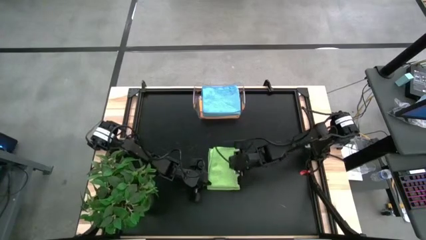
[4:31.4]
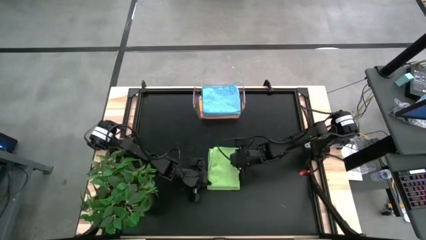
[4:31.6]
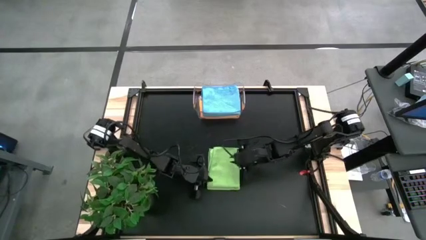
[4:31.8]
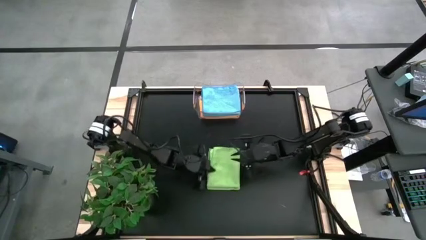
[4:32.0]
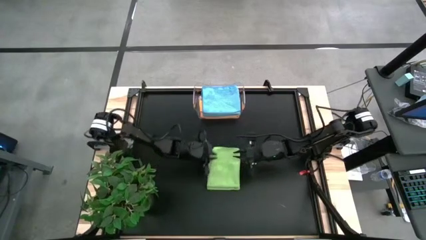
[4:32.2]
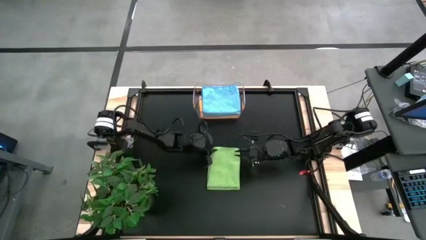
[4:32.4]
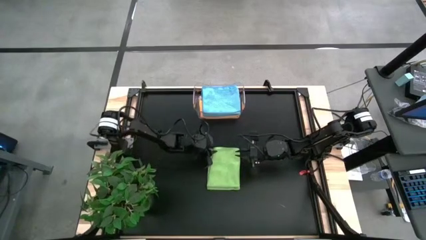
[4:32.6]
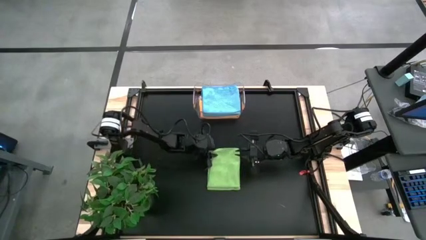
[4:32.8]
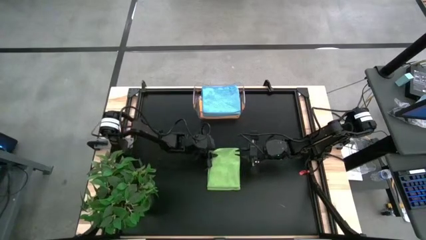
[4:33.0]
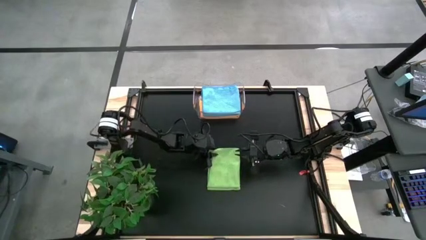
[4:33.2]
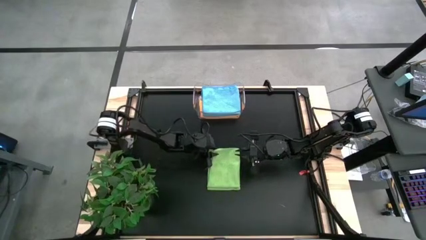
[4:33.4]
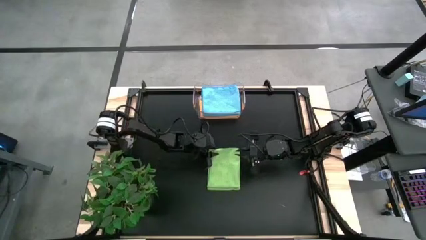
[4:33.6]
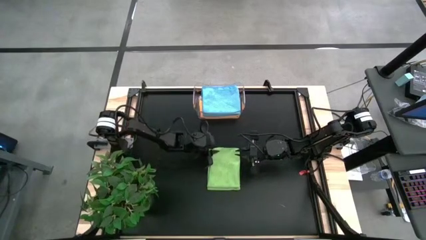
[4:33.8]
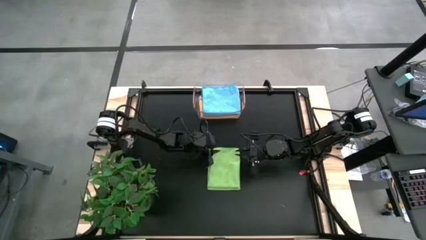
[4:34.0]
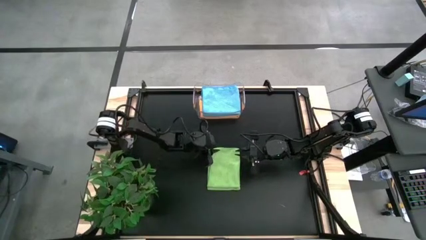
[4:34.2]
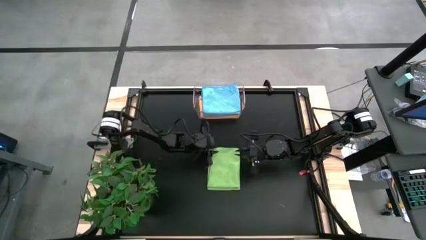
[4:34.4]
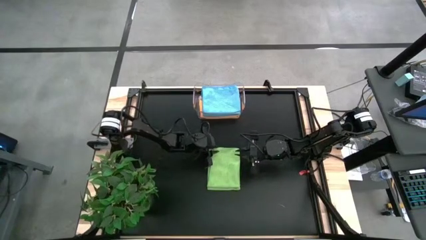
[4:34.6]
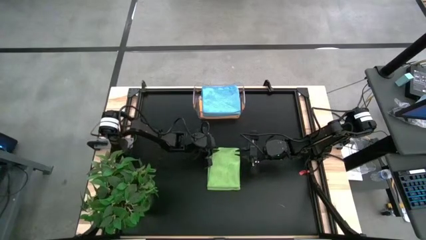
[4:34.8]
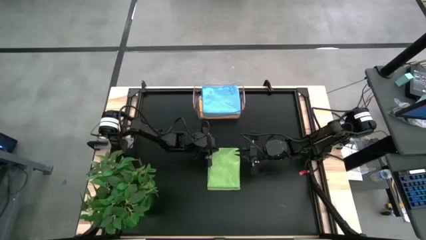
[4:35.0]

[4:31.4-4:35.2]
Task: Fold microfiber towels
Fold the green microfiber cloth

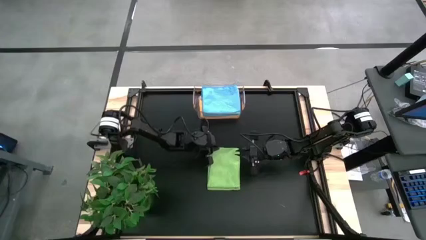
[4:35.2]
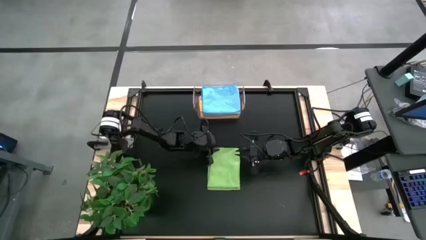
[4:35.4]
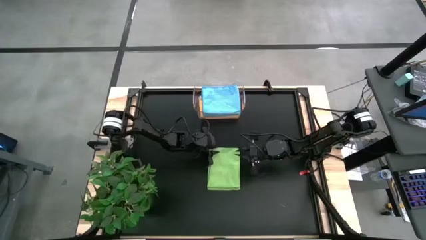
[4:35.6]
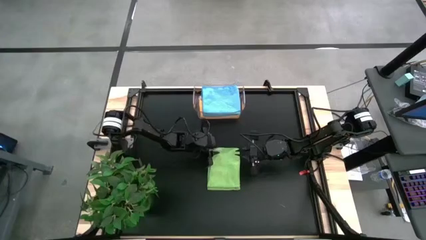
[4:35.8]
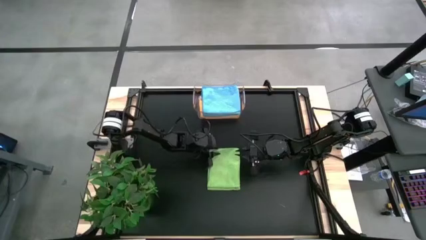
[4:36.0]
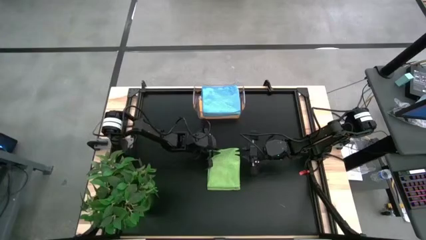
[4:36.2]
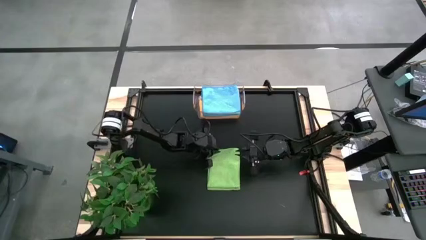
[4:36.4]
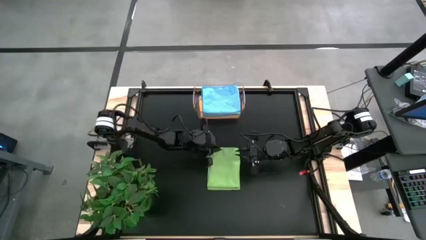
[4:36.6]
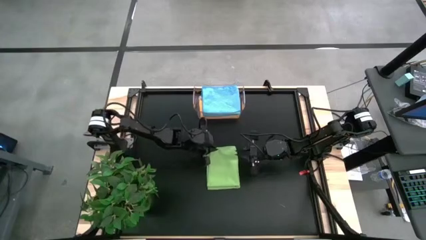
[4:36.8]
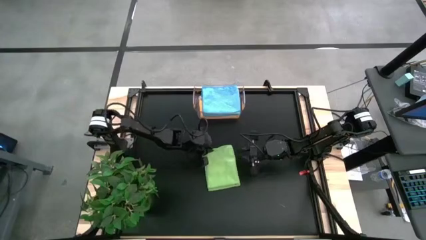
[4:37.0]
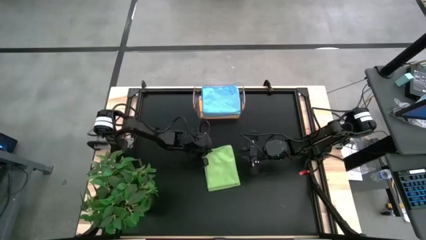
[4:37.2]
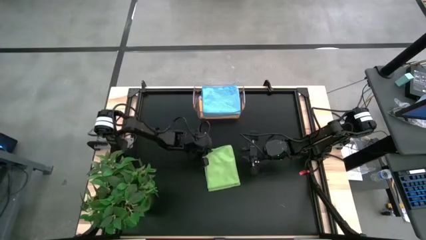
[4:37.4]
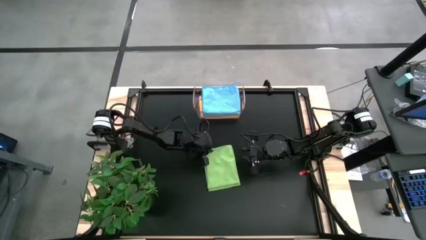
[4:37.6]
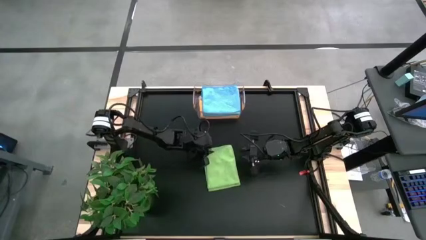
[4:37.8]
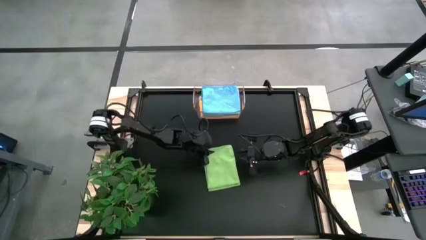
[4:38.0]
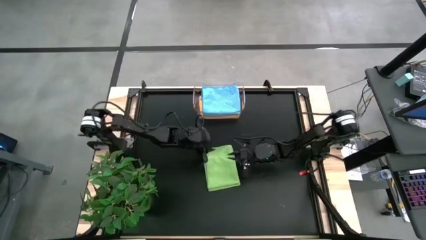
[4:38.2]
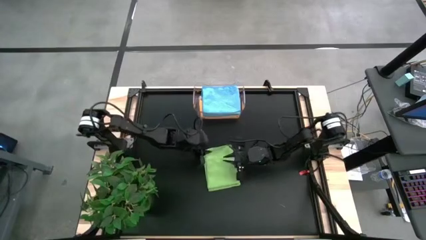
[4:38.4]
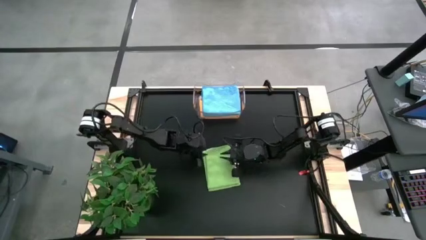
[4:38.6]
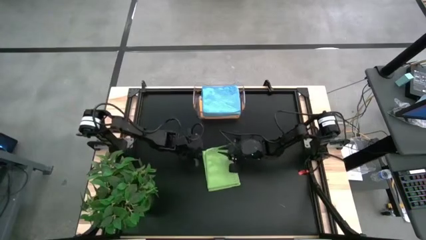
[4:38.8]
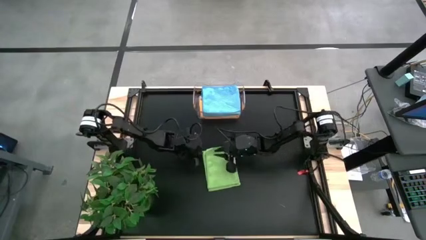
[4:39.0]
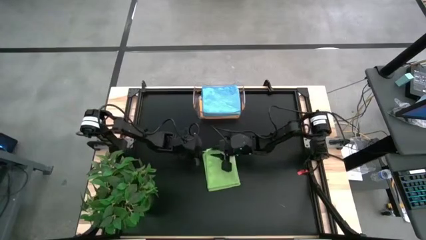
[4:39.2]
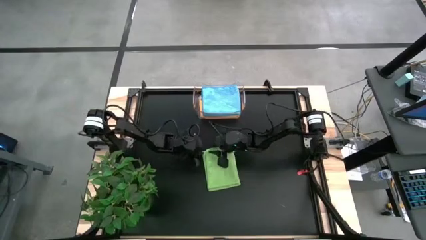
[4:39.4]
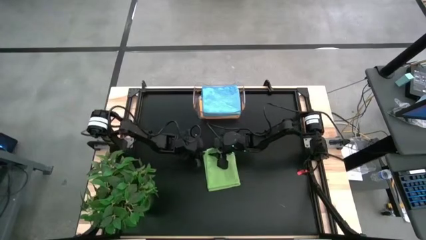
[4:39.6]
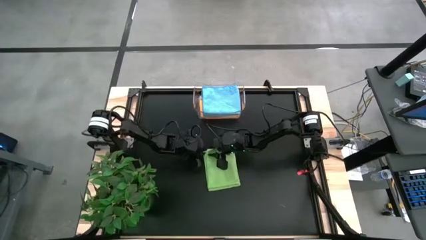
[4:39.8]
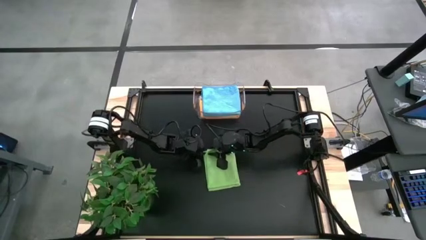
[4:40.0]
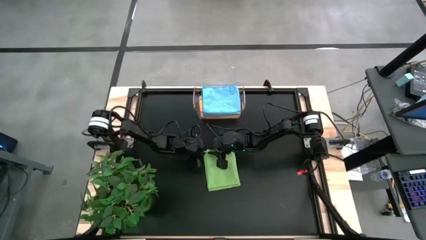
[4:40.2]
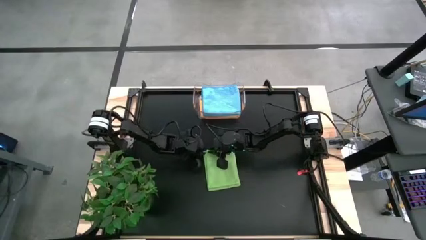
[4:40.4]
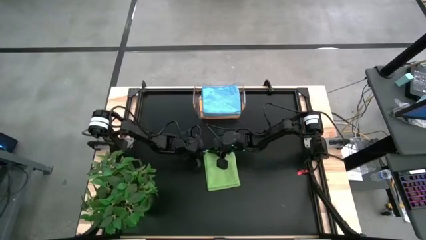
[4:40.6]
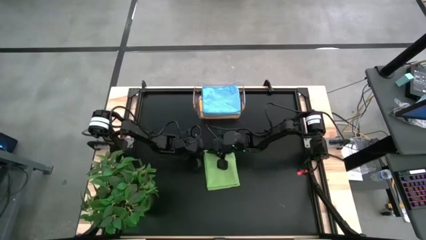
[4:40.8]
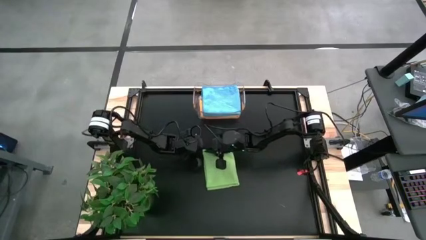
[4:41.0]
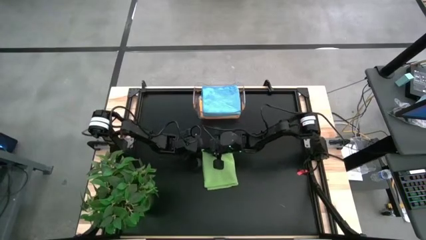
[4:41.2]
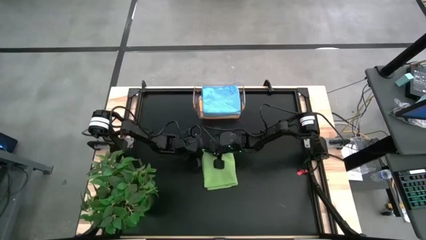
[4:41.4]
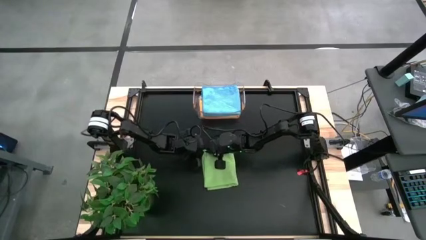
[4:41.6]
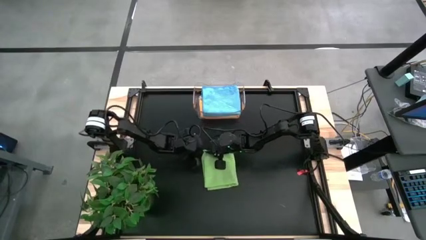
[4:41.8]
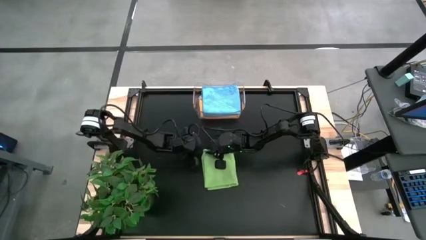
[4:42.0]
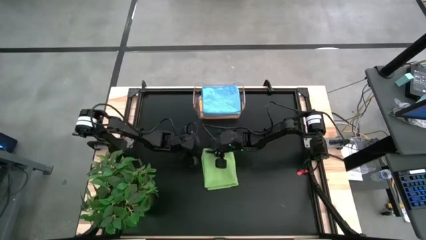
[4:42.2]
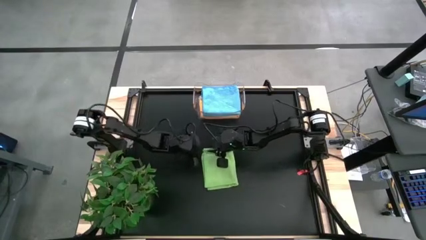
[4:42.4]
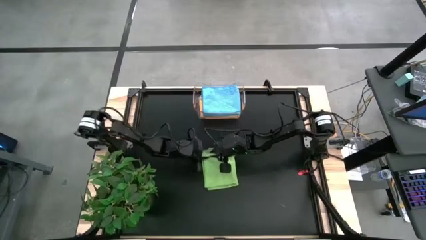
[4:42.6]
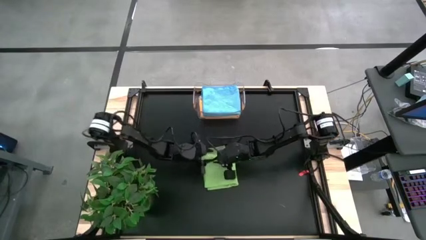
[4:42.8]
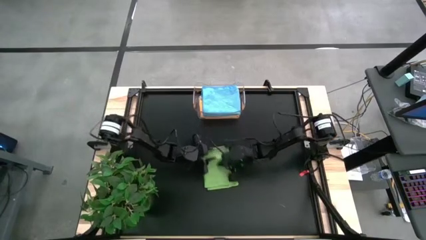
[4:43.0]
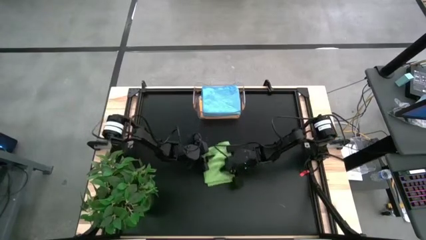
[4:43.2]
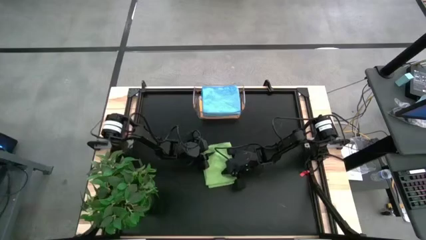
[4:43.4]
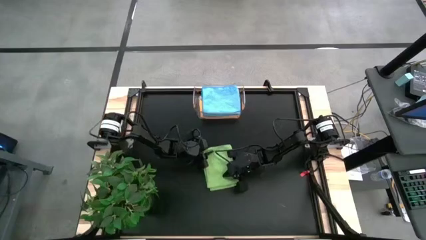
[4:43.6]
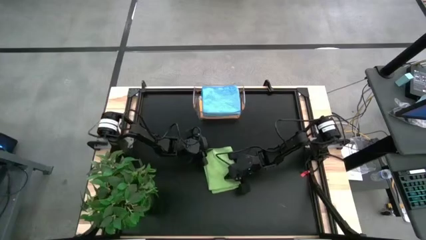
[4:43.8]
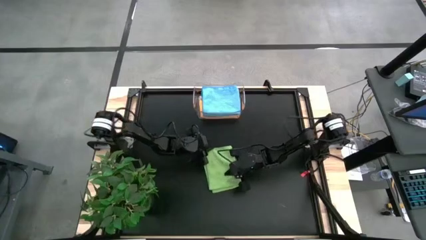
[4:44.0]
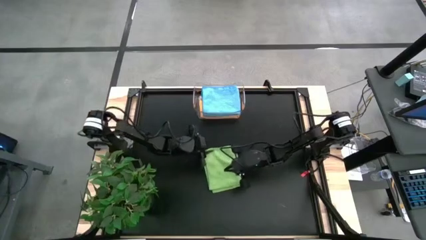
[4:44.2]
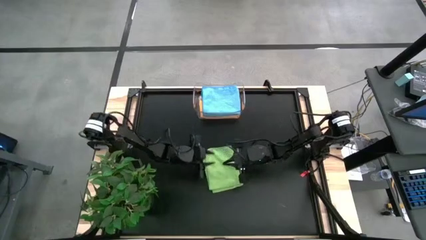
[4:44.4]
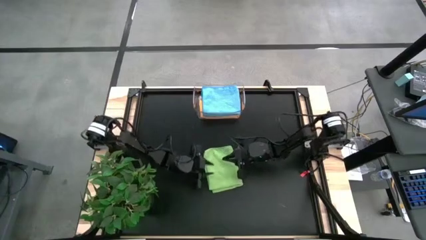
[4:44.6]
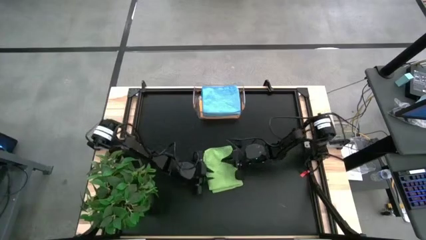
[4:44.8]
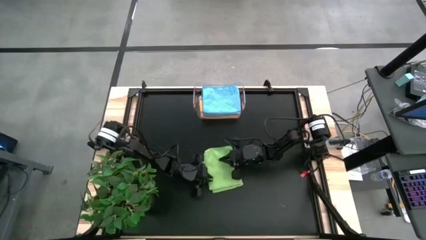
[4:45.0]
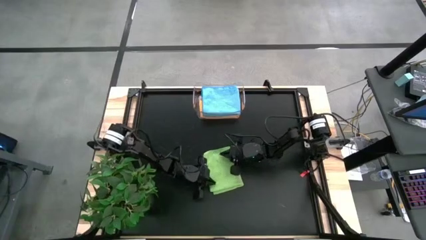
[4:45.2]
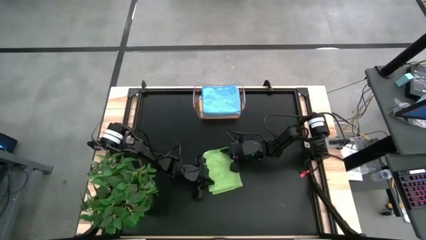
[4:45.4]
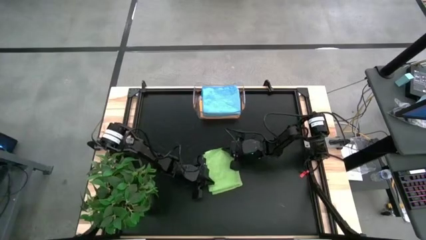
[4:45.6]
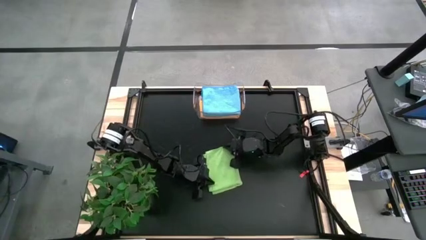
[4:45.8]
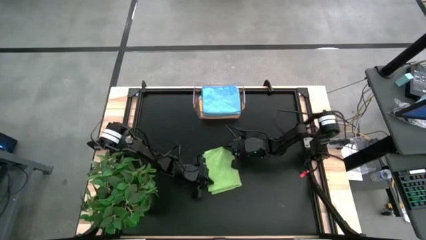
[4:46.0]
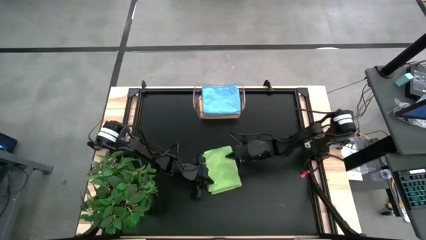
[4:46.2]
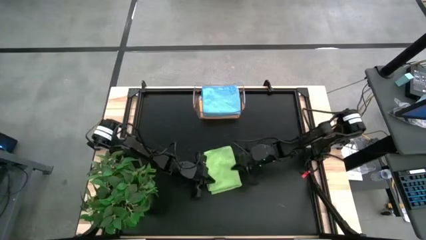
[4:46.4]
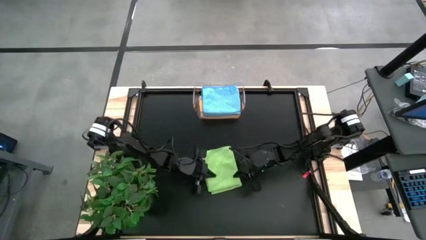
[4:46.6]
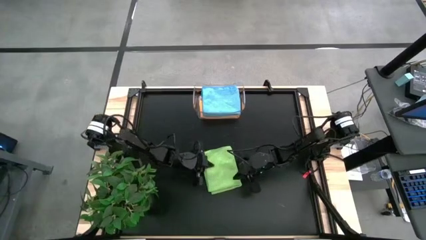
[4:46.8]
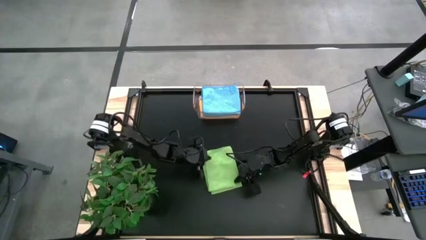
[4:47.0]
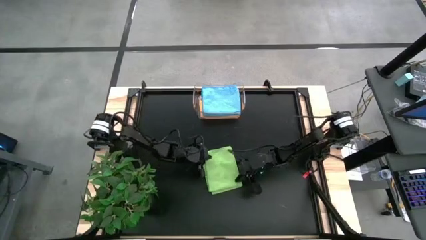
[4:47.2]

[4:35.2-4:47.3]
Fold the green microfiber cloth
